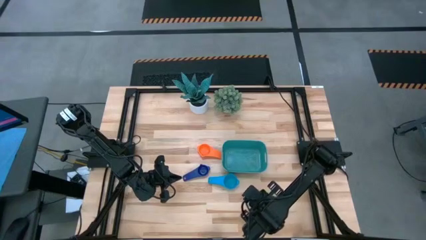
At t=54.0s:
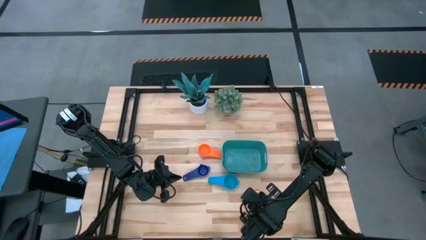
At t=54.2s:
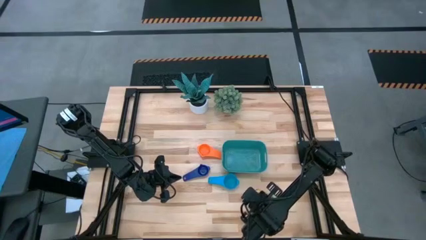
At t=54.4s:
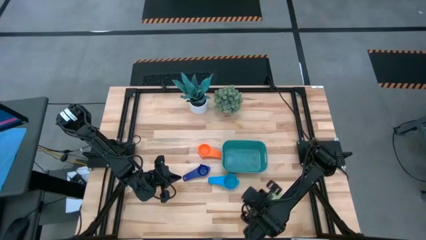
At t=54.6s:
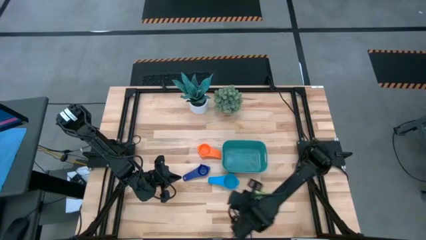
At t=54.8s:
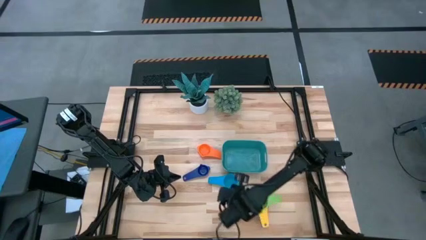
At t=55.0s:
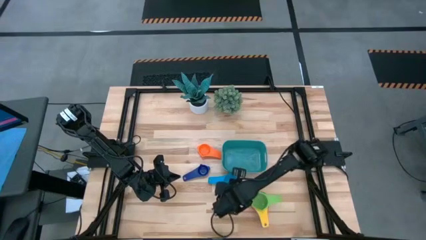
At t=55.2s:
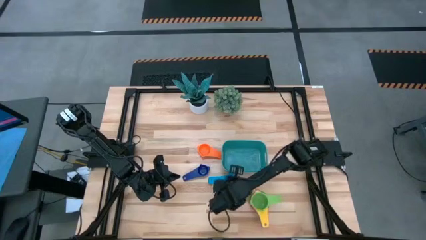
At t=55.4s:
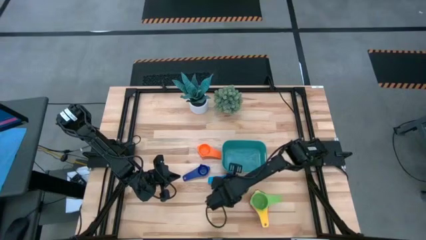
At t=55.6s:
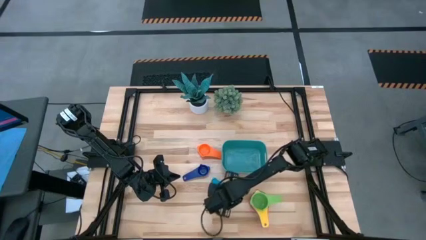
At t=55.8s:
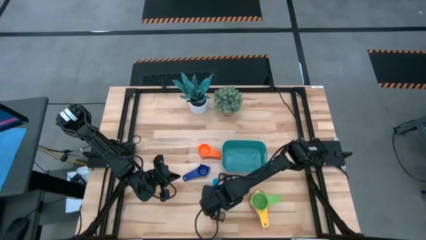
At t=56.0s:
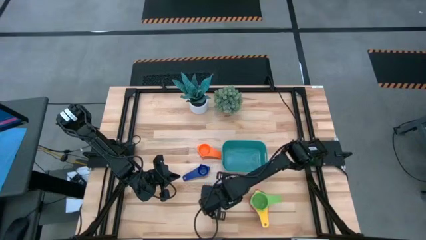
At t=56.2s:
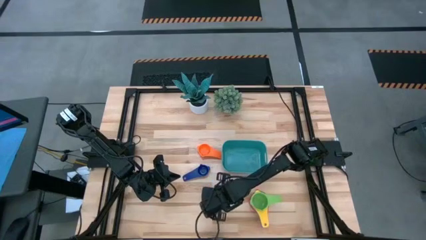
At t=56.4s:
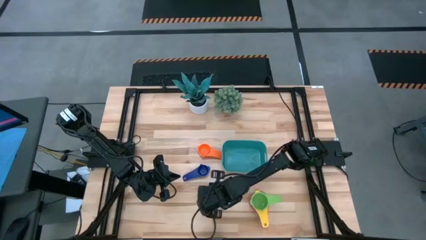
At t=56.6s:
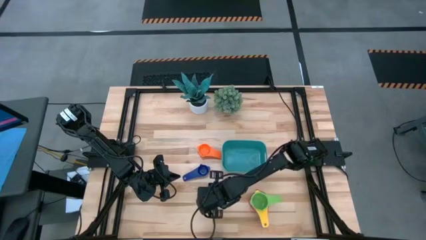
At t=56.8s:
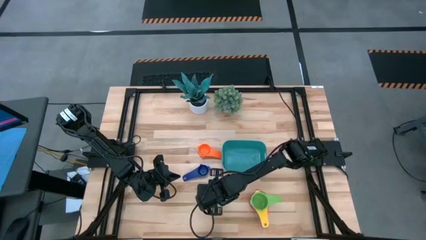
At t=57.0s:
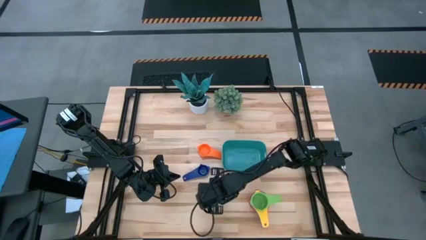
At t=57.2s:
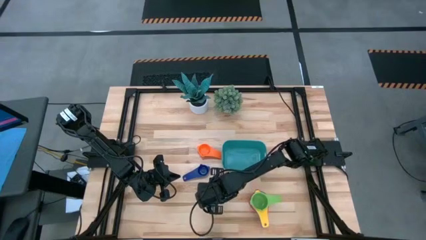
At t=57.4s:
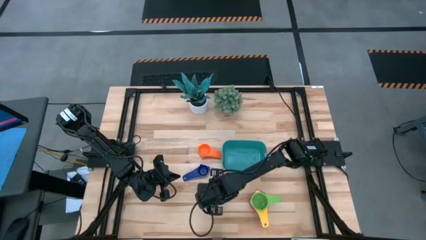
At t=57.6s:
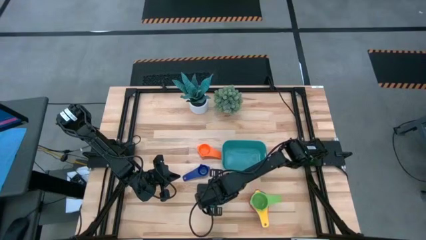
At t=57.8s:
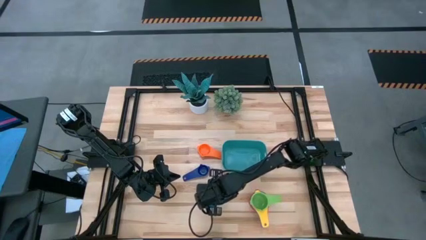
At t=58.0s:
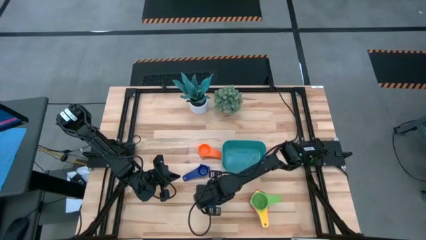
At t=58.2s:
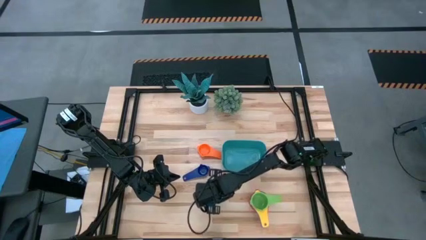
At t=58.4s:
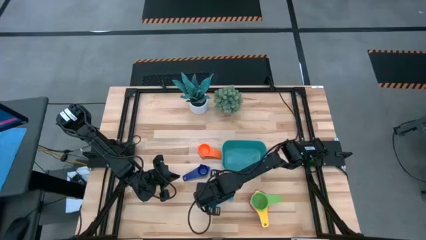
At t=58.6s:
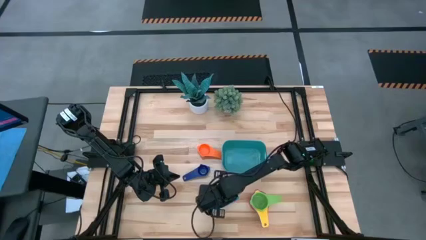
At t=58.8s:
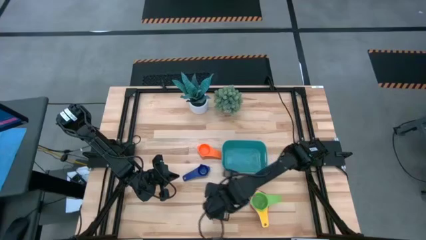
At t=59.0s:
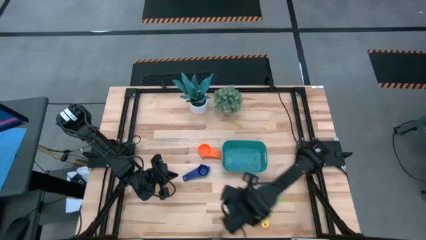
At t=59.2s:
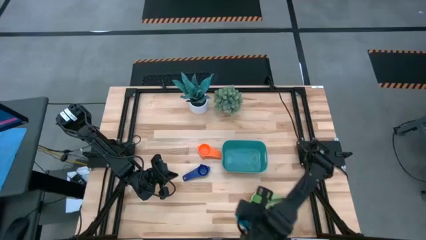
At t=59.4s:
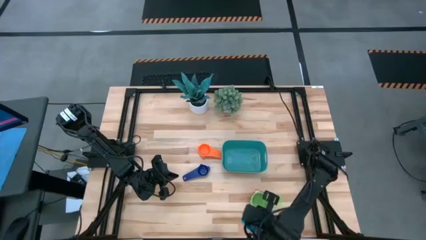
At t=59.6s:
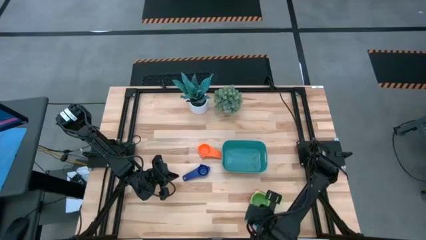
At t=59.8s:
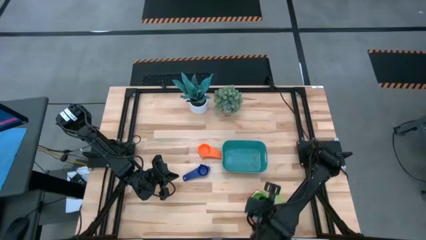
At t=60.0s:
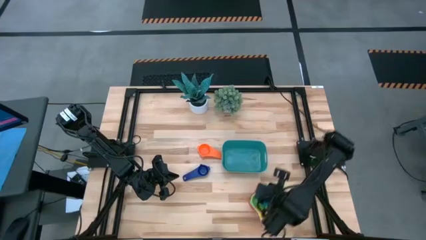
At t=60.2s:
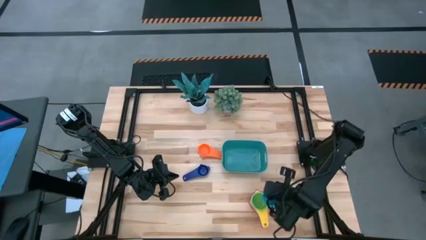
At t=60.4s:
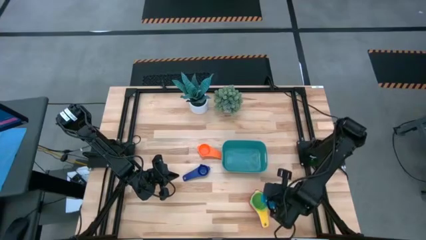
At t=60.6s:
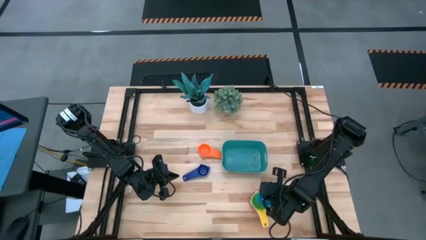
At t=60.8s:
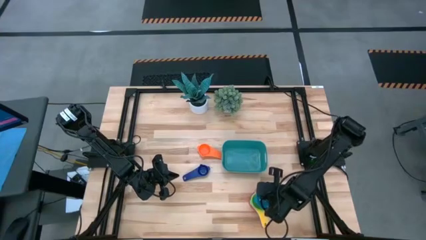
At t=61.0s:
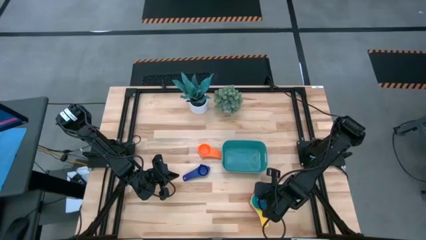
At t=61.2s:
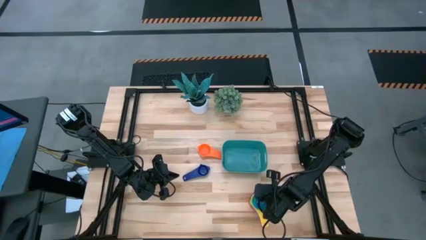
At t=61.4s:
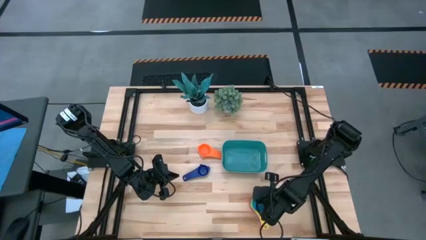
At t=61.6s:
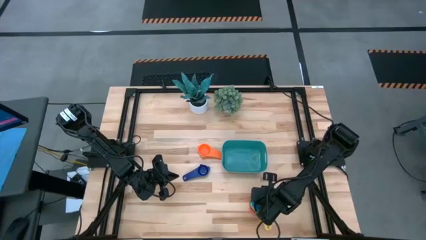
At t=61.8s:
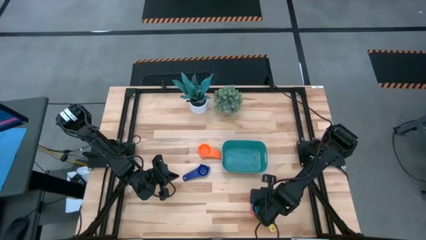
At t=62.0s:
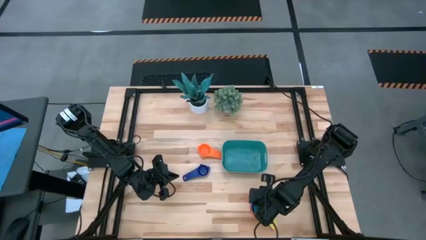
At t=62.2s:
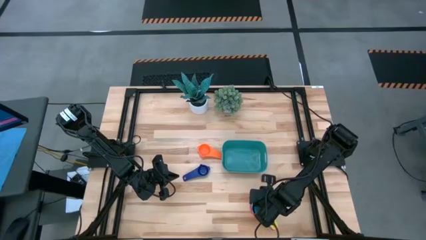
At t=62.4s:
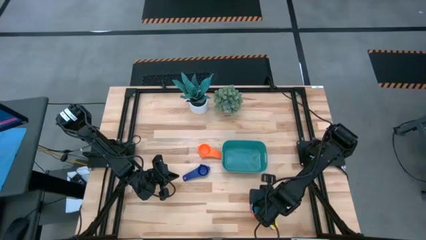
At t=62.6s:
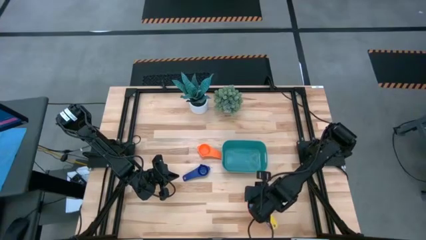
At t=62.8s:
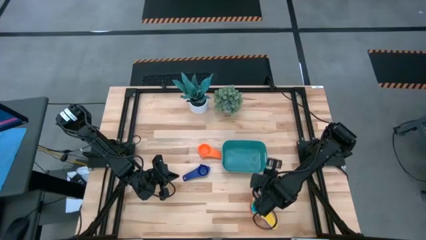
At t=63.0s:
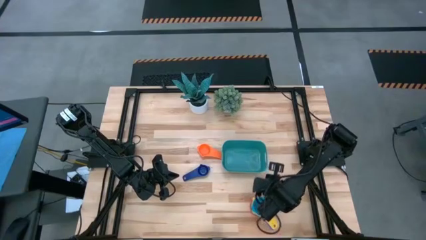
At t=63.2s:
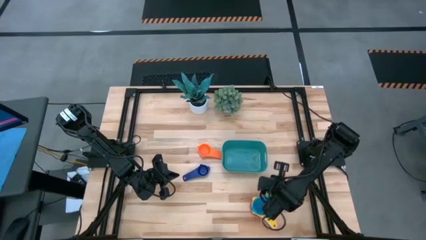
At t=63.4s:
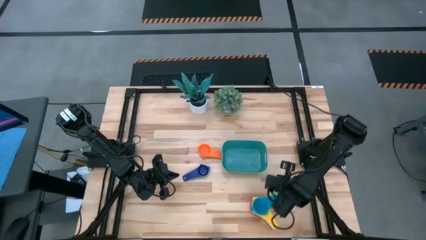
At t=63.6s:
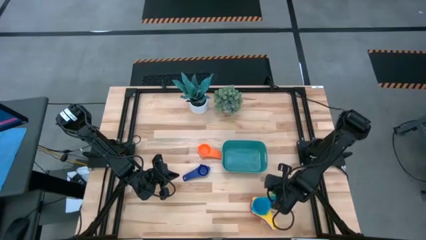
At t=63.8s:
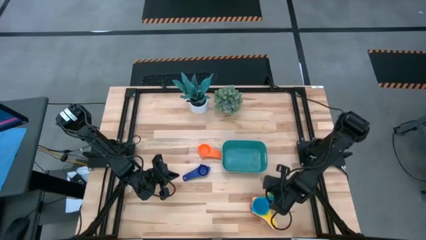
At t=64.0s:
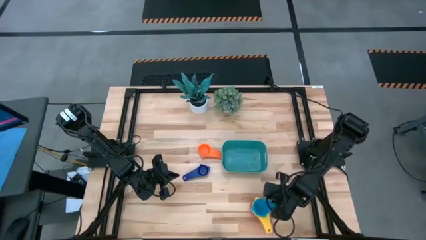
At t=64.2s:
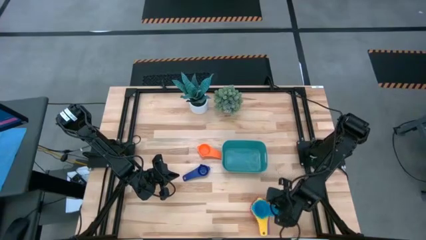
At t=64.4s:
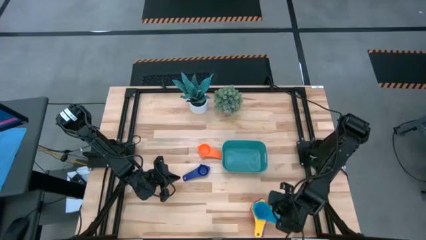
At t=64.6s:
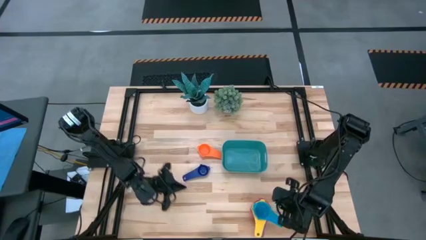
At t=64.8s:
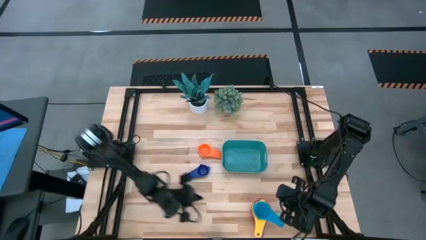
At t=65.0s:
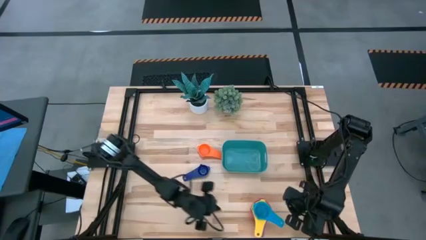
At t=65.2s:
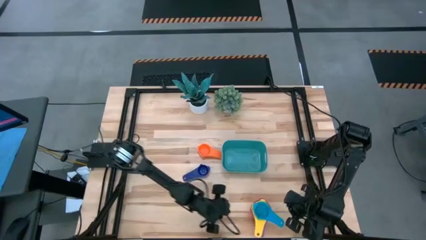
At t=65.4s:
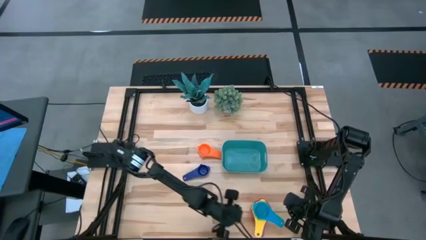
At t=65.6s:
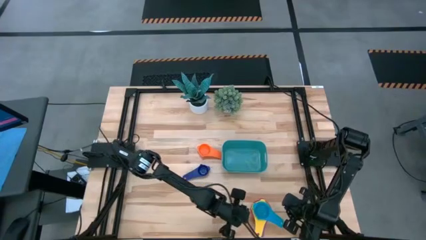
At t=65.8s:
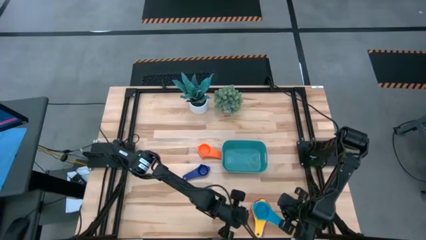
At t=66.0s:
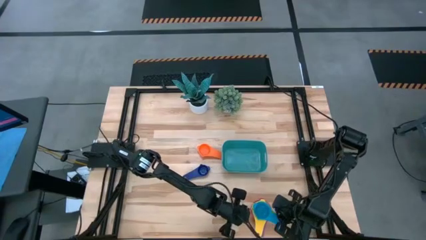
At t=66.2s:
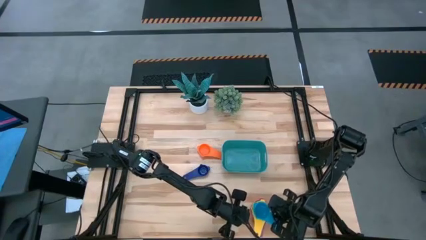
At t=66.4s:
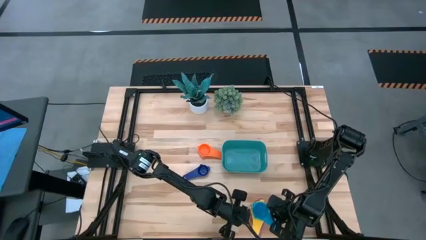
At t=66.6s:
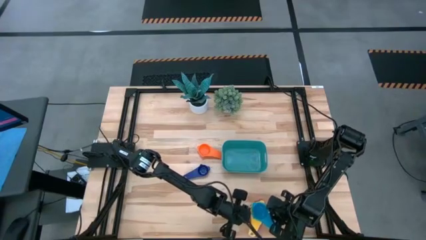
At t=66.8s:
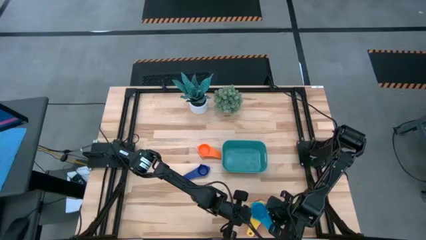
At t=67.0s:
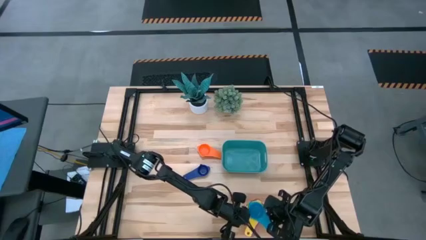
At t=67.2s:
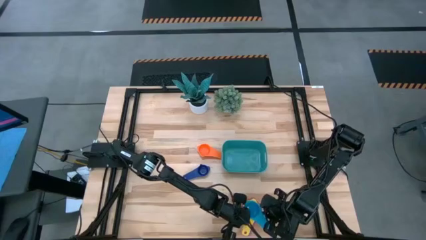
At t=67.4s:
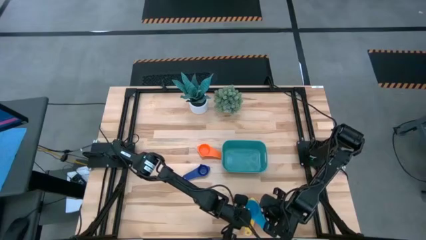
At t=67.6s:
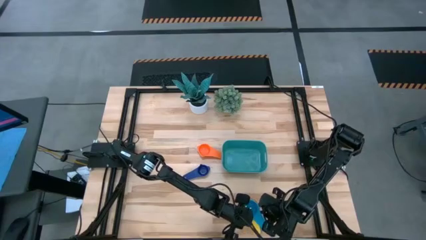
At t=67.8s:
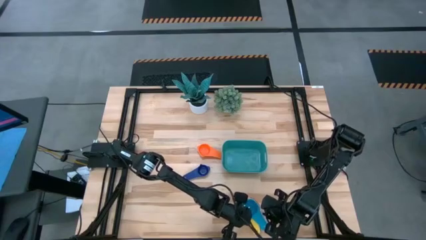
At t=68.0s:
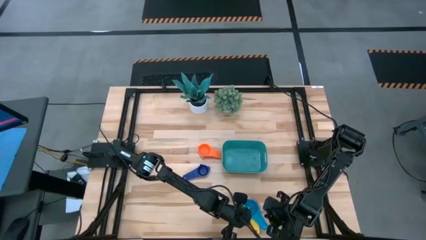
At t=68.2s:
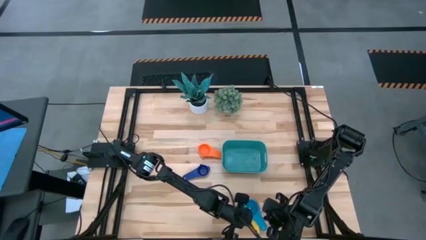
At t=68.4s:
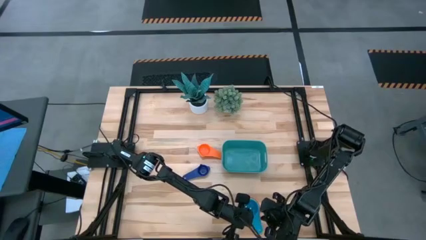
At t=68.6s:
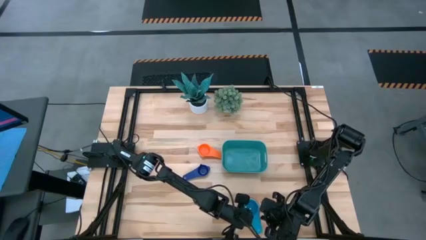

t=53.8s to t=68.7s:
Task: Nest measuring cups in basket
Stack the light blue measuring cup on top of the green measuring cup
